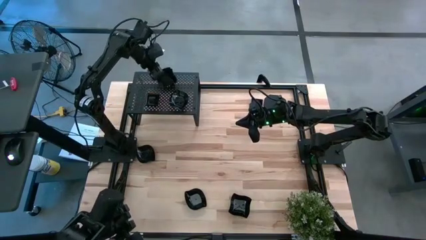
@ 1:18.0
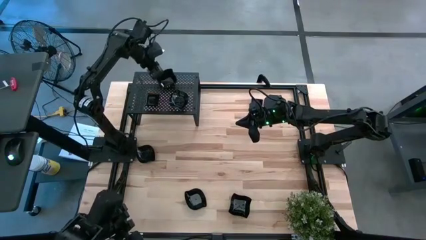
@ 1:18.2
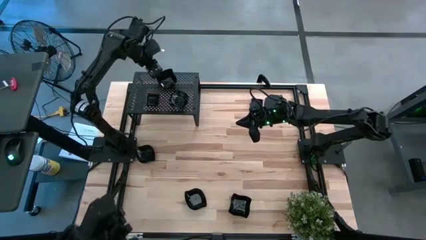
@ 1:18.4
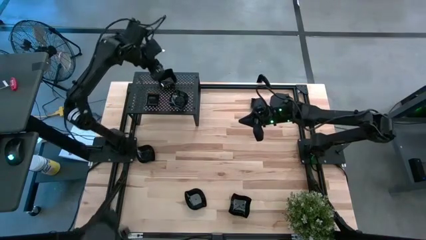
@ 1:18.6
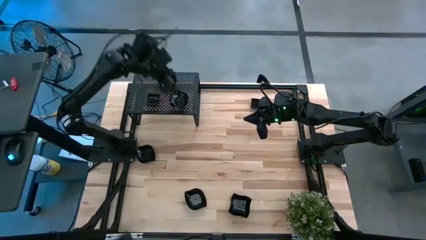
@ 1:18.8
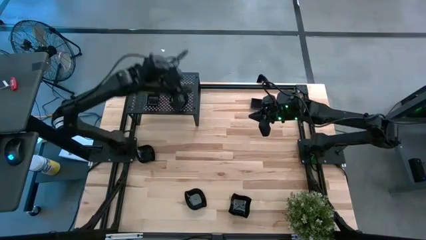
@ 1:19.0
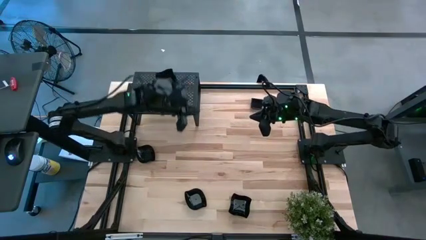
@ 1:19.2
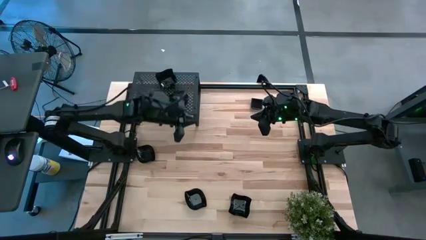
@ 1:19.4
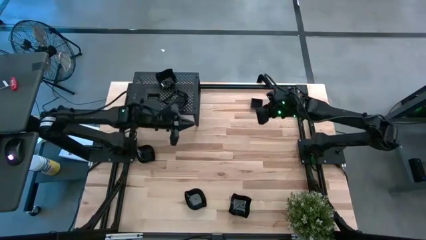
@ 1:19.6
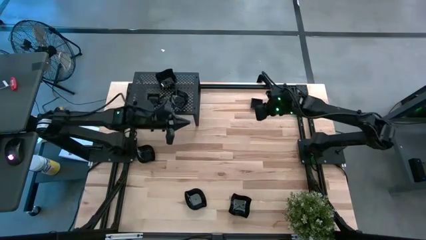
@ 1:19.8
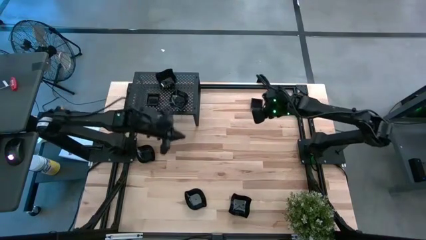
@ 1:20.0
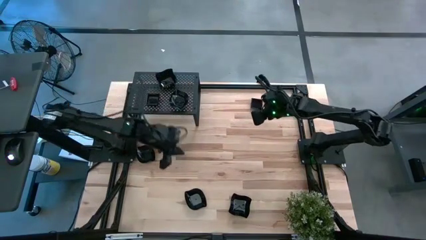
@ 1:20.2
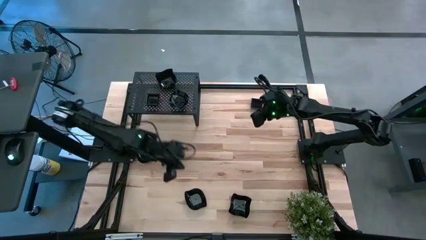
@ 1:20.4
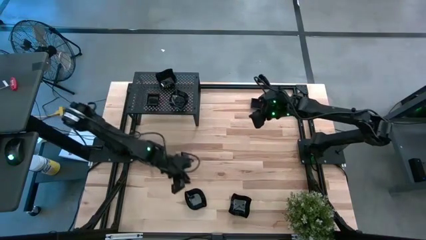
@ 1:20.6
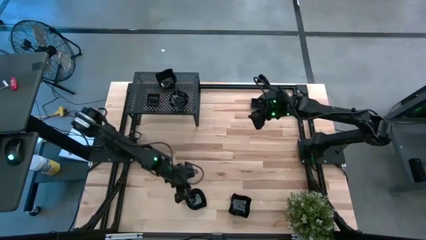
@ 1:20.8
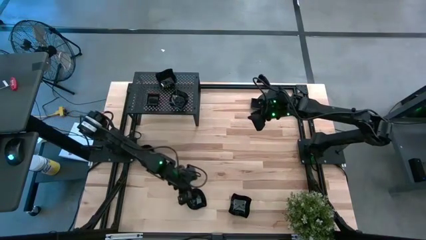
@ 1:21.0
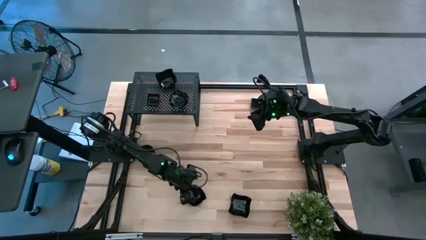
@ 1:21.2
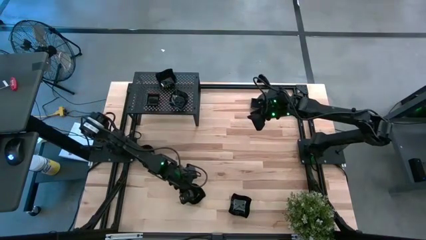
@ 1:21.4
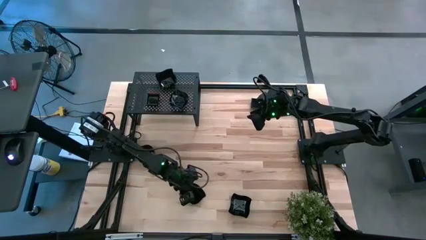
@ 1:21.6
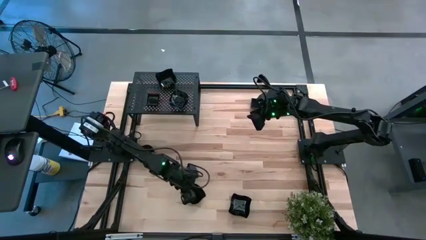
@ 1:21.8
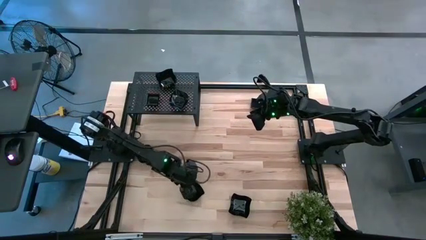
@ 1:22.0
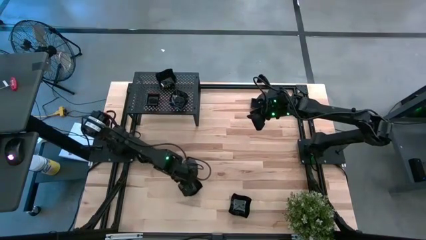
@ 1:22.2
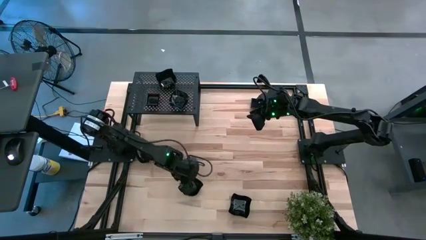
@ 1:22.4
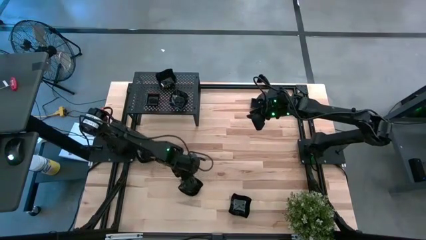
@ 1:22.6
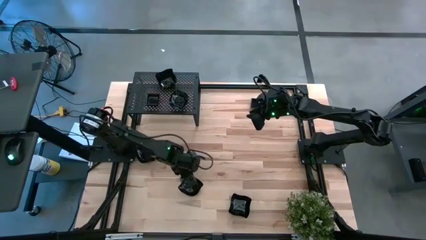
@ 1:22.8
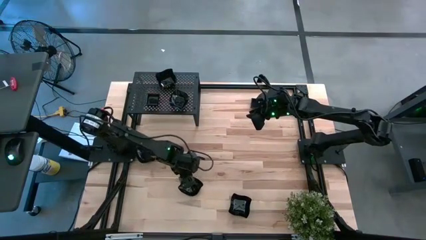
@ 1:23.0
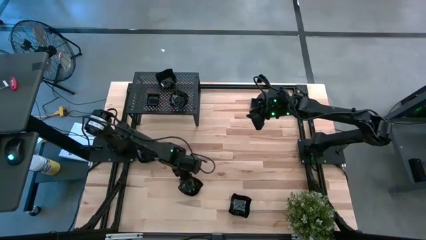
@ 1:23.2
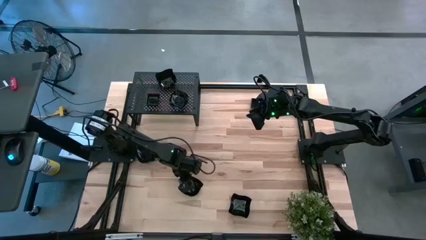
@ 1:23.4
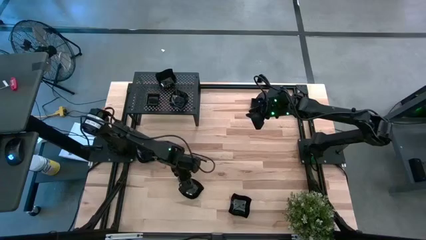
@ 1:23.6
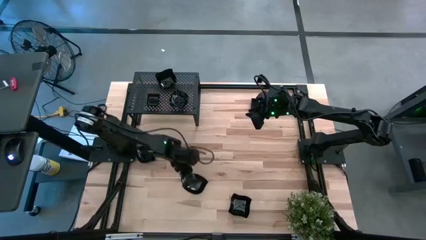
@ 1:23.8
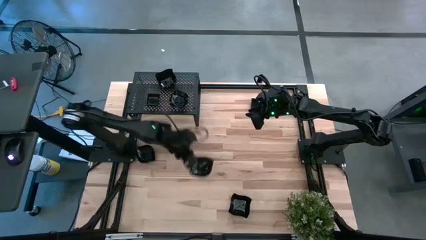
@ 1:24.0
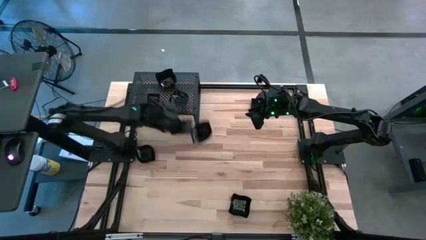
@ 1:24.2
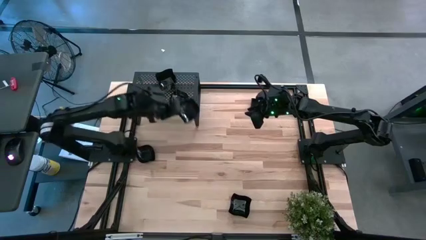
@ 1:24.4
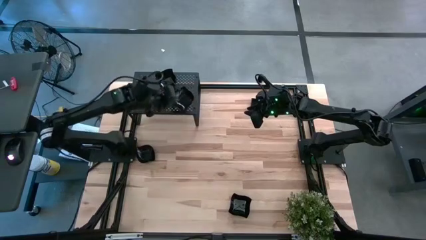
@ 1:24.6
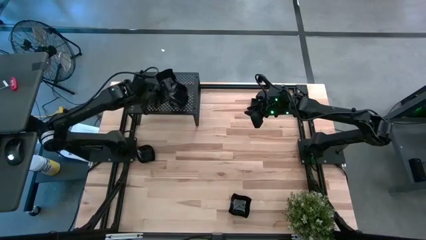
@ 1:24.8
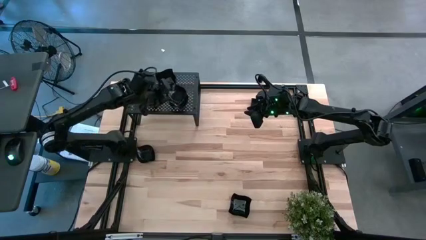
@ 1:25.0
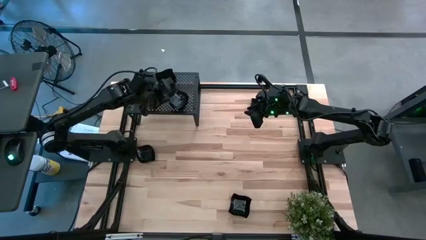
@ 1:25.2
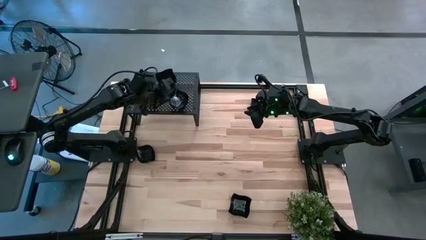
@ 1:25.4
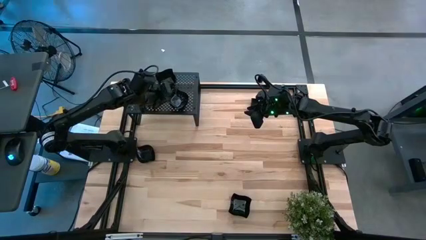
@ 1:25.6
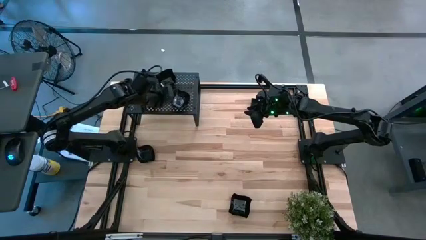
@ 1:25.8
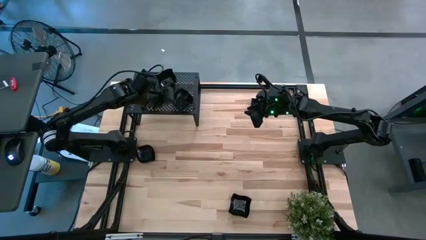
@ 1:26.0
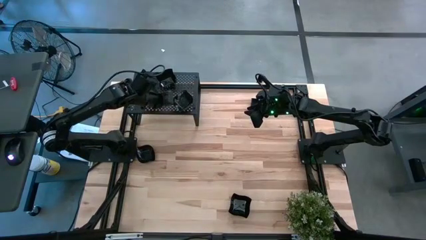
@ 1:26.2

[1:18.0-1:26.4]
Task: Pick & Place Mini shaped plates
Stack the black leaf shaped plate on the other black leaf shaped plate on the shelf

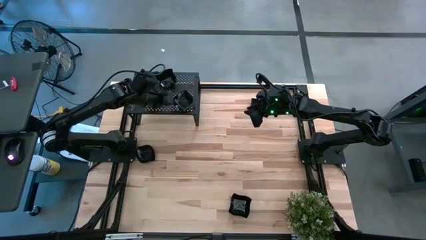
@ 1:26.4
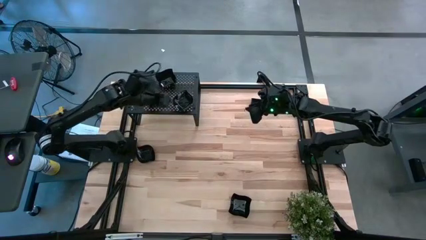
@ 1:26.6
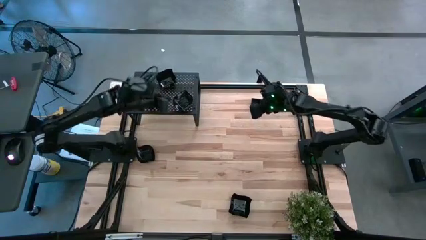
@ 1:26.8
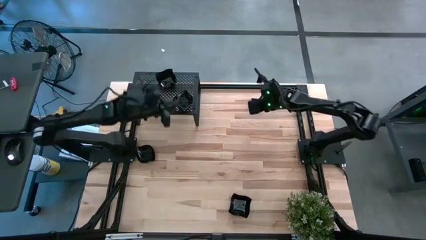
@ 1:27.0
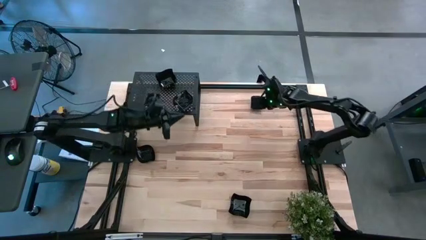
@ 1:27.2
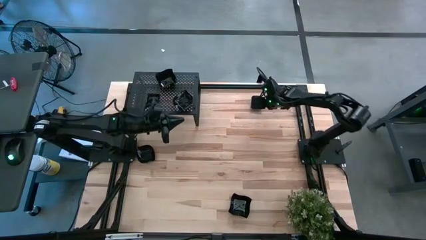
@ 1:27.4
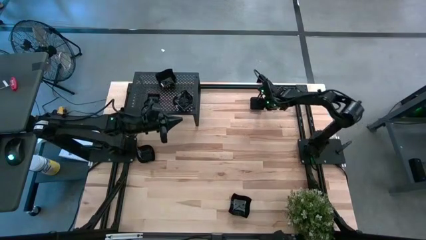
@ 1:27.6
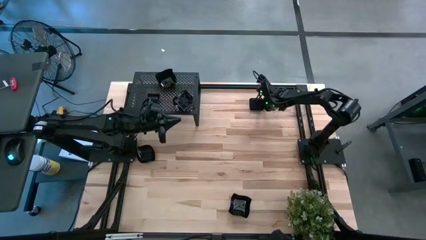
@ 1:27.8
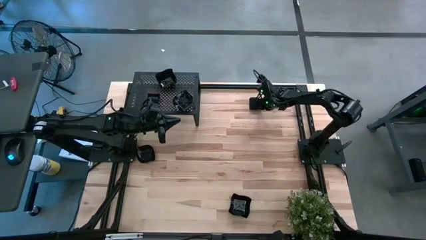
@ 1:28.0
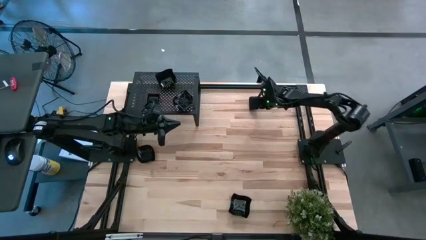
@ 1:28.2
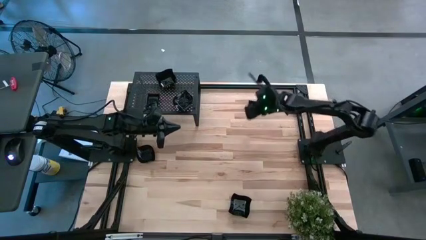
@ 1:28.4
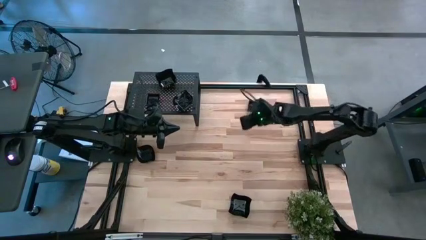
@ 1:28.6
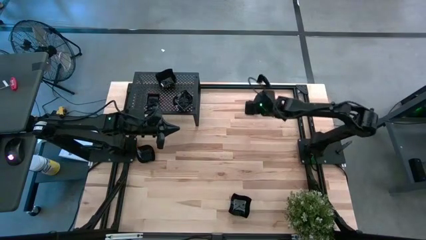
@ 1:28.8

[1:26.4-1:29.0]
Stack the black square plate on the other black square plate on the shelf

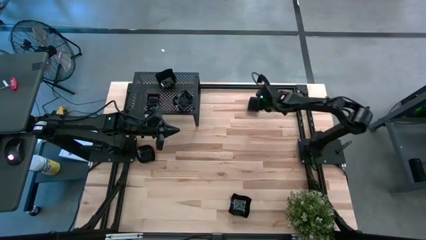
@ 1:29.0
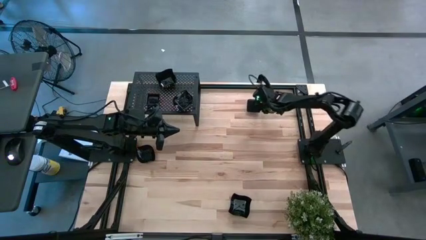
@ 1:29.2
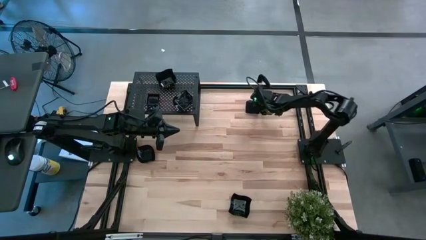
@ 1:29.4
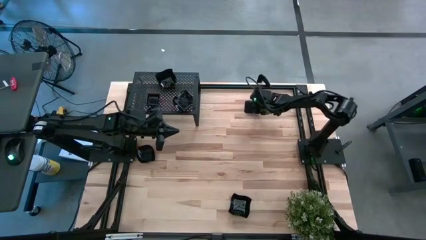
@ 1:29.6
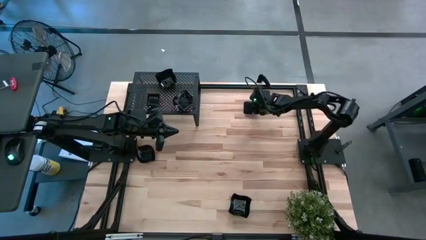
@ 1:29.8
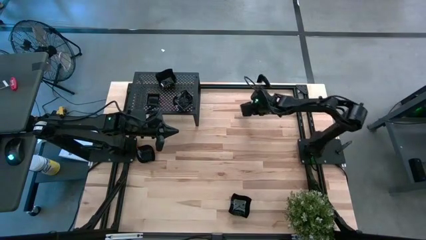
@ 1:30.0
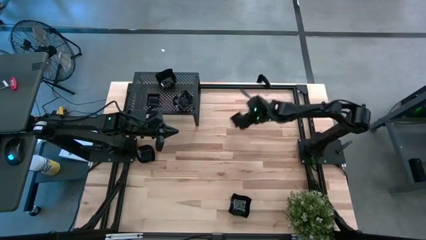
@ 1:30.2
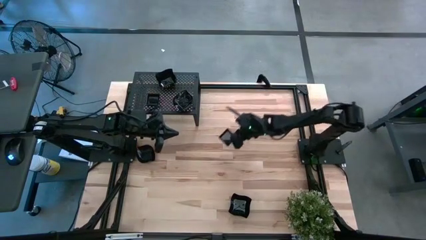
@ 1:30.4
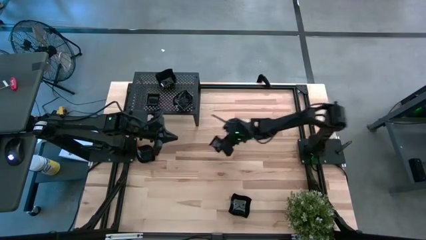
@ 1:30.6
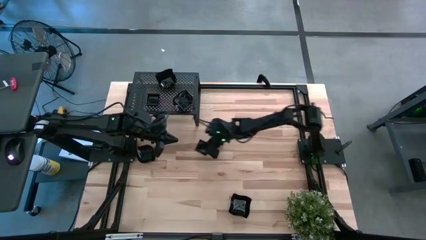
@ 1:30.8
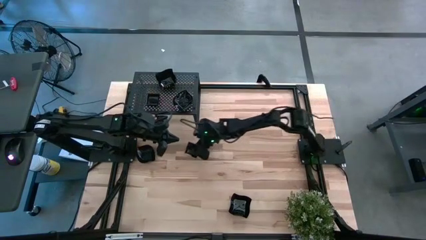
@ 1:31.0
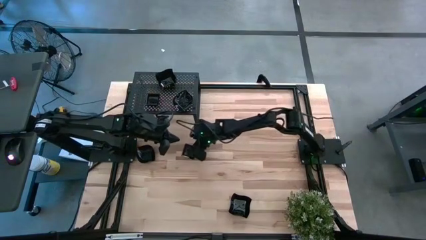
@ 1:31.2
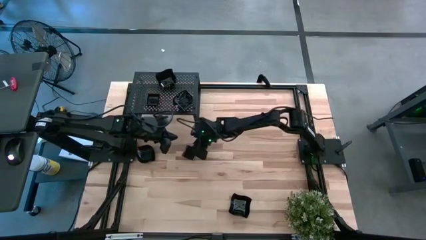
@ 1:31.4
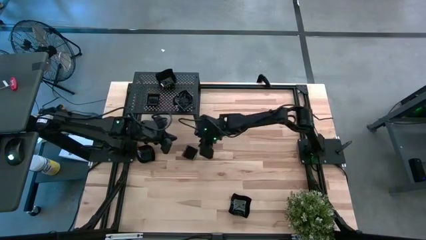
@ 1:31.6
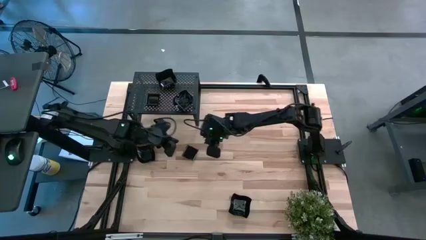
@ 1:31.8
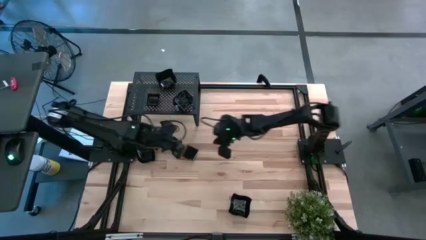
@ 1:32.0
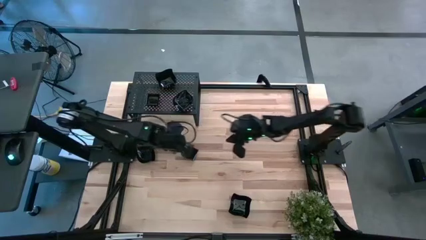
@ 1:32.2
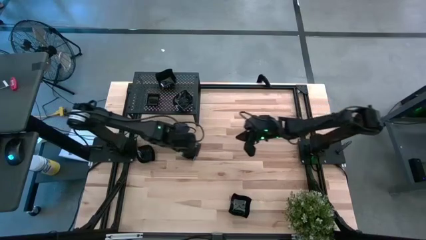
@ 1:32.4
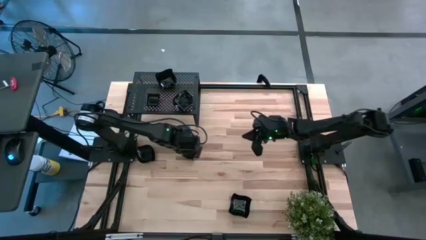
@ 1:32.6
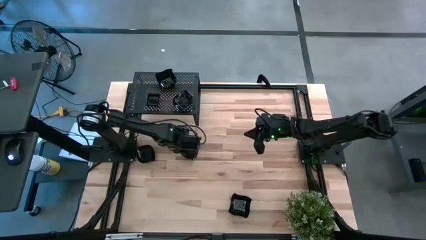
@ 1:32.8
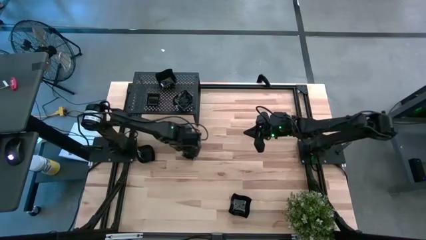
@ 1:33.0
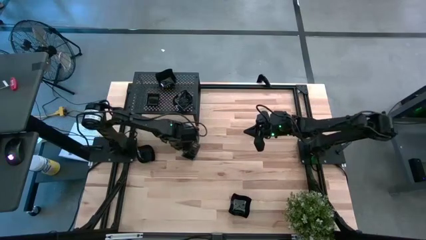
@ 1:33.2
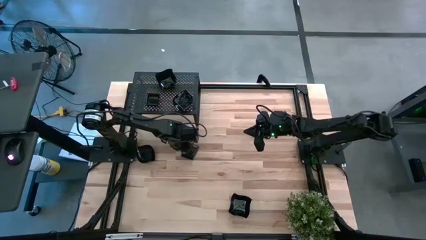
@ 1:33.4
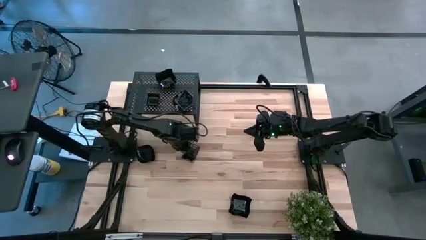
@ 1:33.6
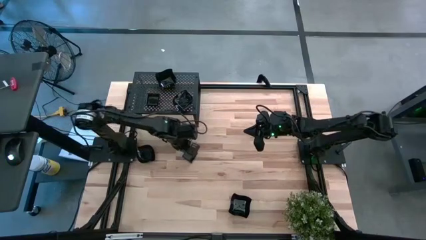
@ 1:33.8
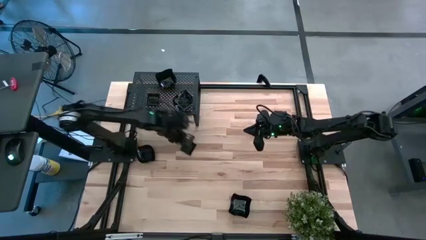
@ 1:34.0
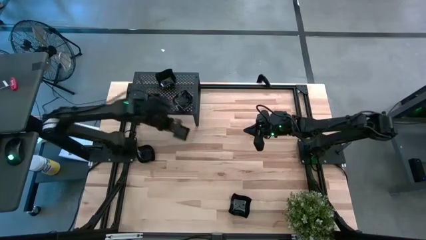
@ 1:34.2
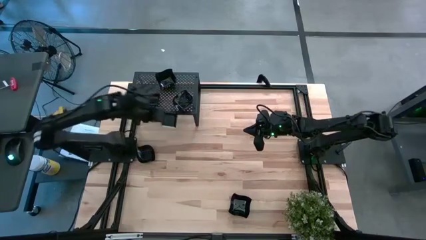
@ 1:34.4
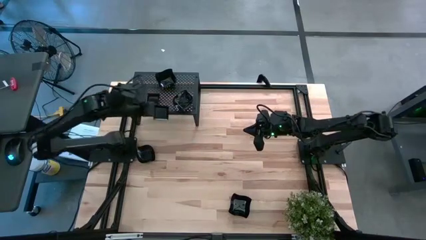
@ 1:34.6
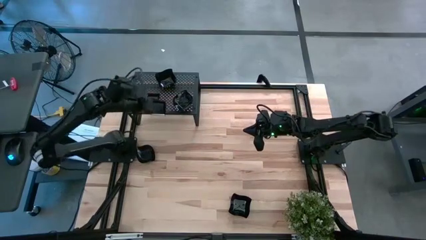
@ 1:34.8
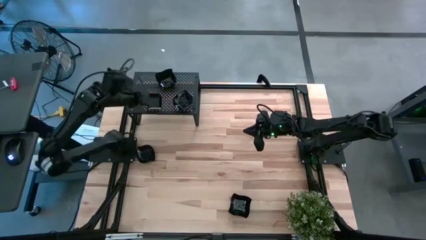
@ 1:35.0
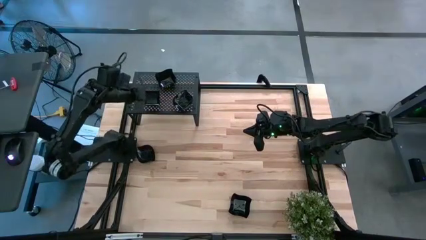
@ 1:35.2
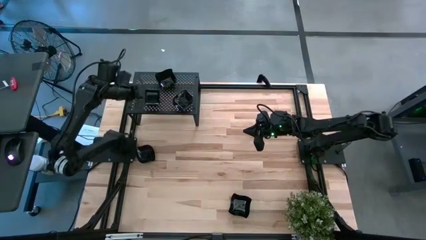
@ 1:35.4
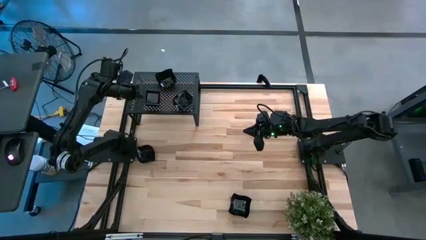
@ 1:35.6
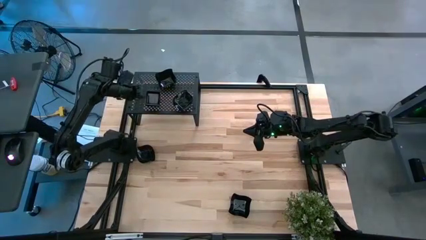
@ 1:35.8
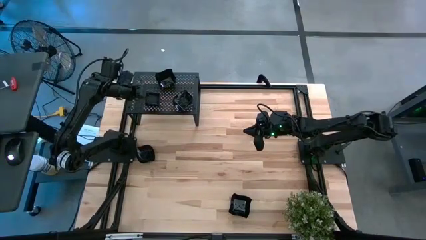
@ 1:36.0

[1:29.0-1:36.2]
Stack the black square plate on the other black square plate on the shelf
